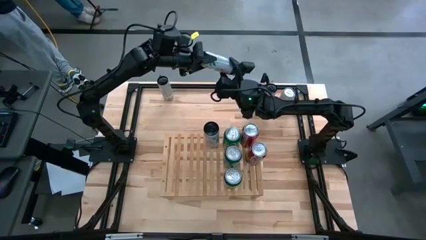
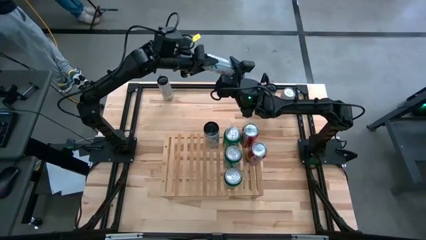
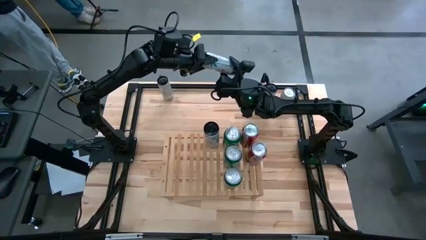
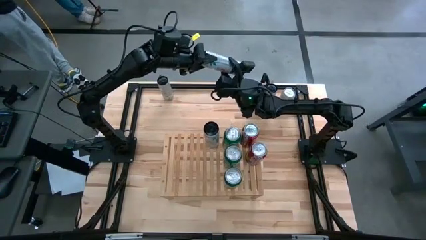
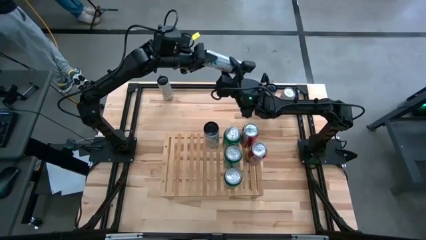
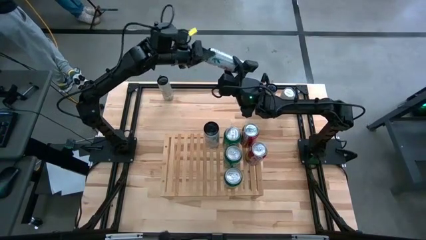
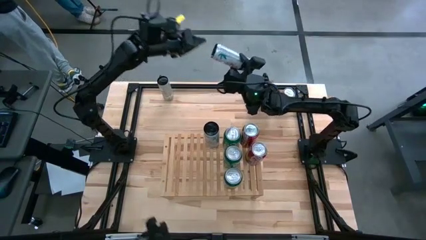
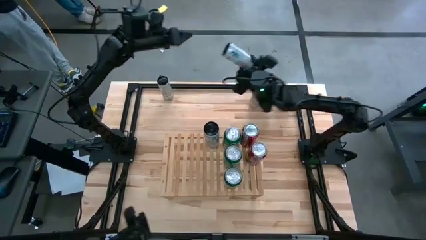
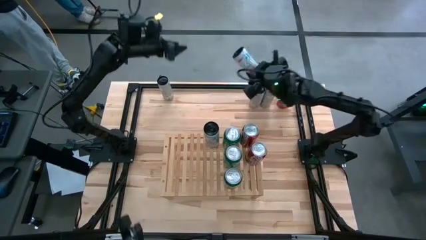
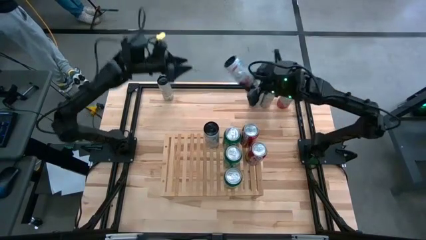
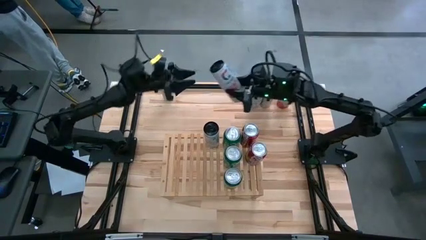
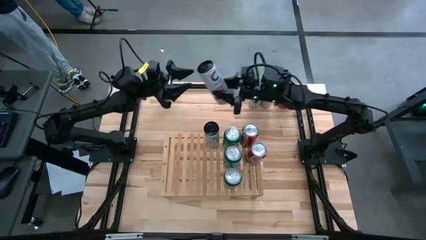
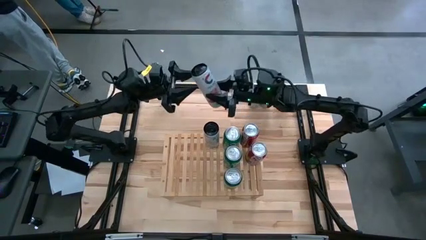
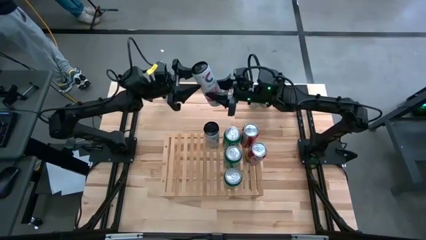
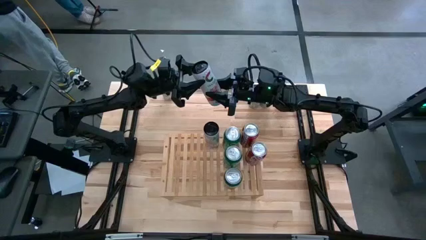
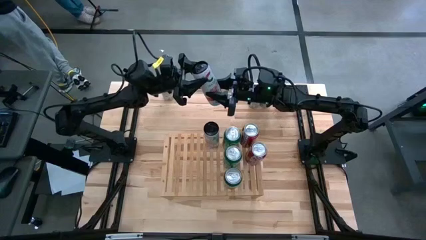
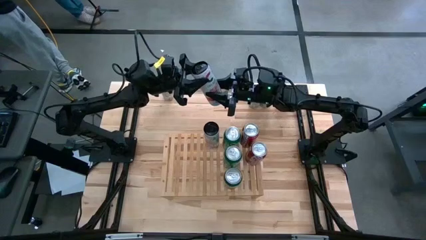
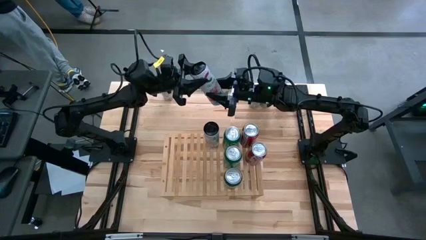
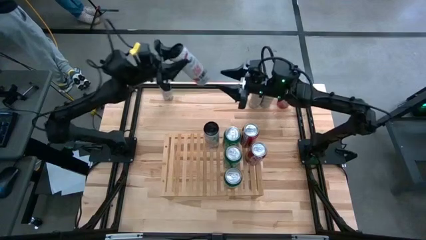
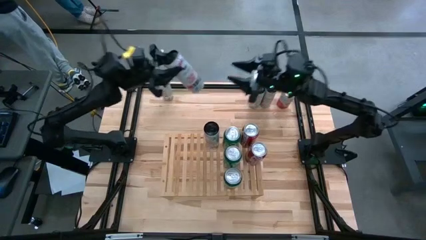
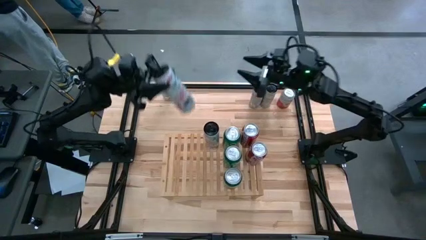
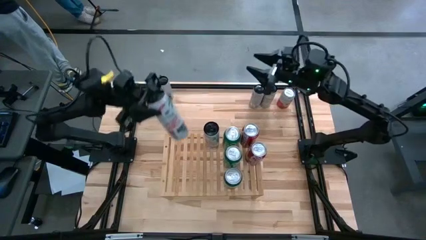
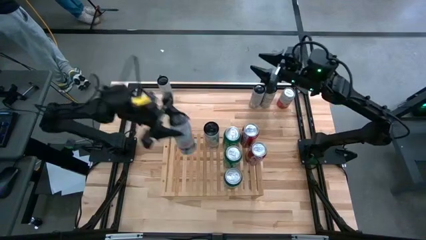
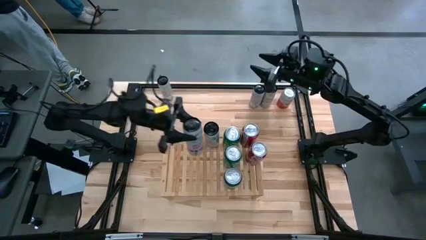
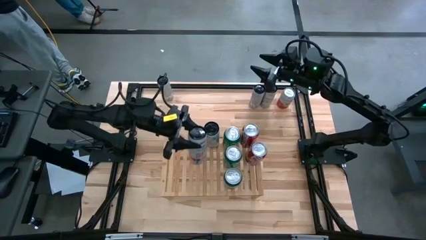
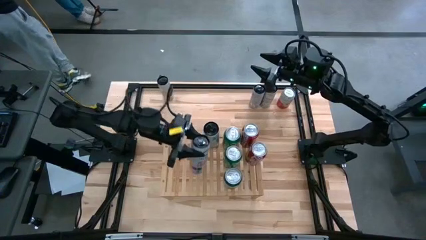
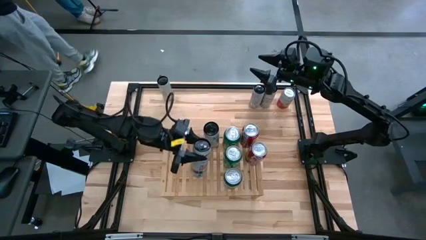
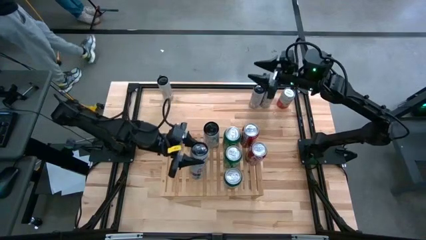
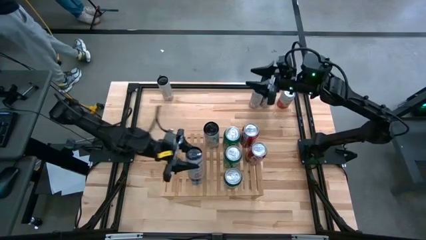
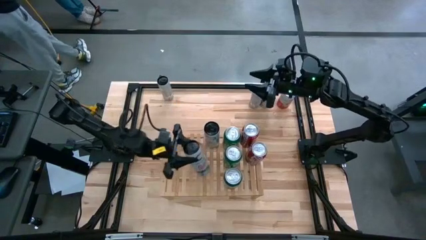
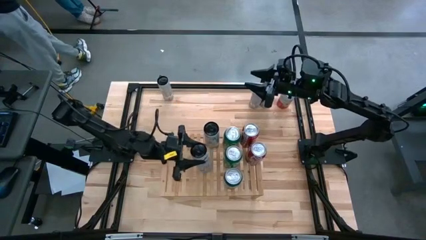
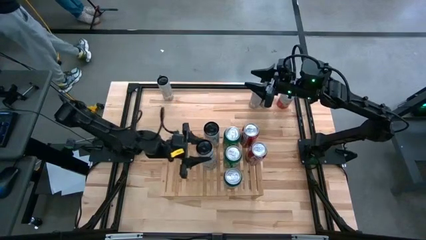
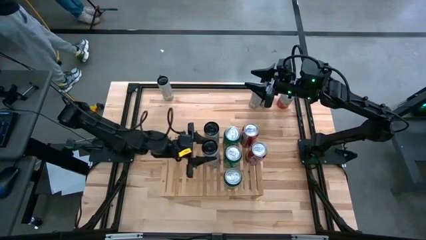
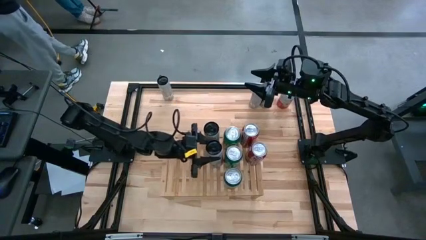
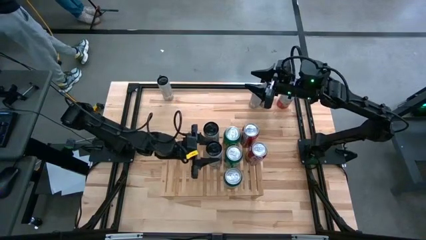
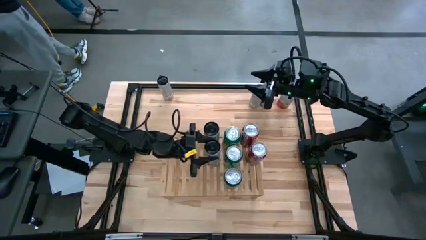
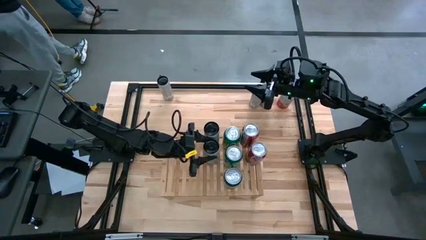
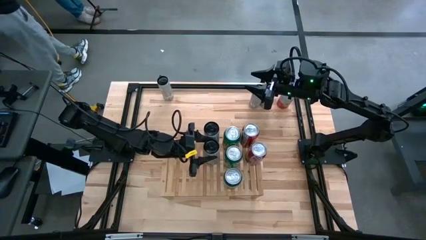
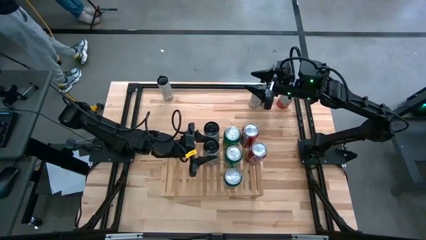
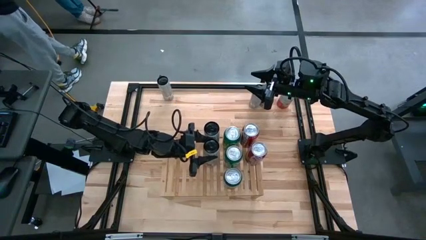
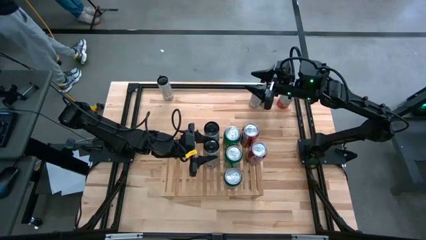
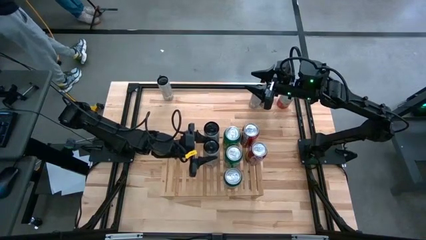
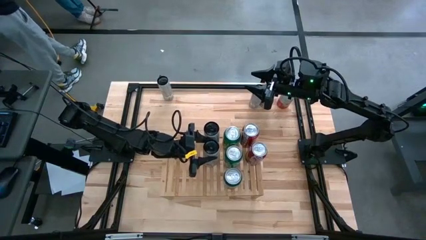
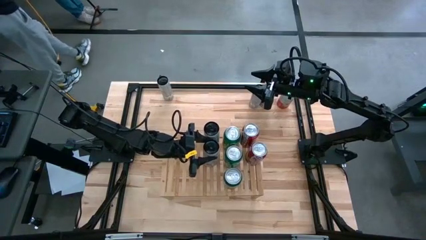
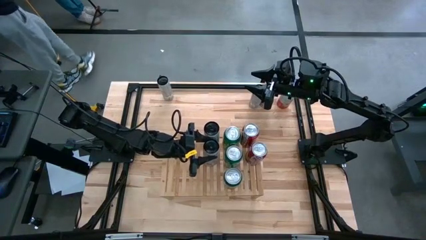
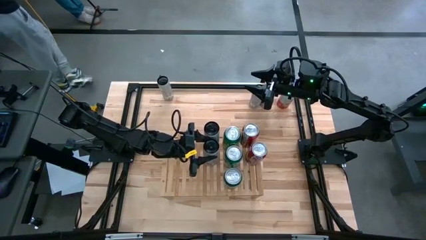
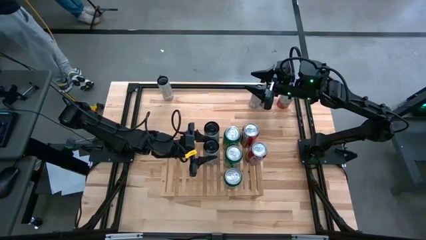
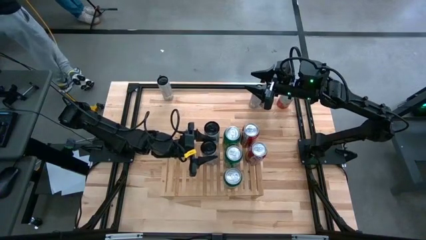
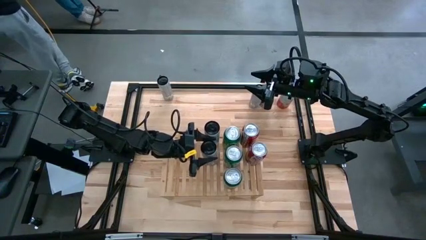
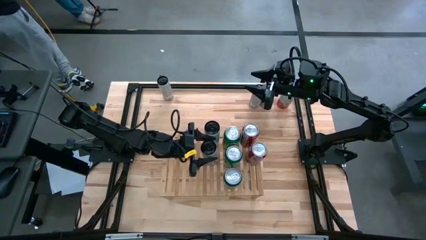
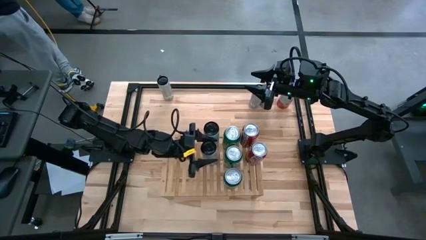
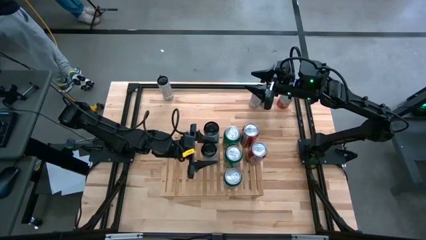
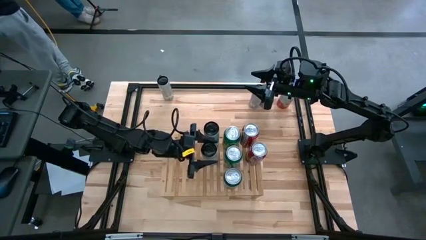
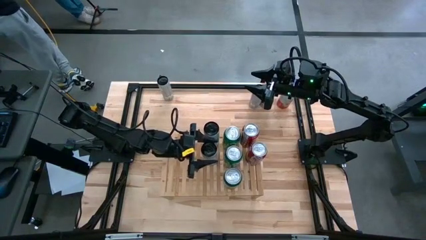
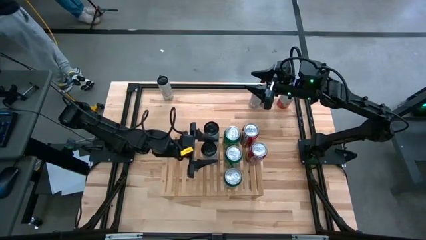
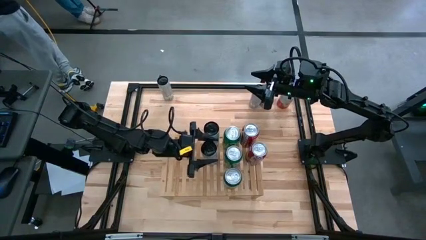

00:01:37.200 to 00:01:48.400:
Task: Place canned beverage on shelf
Put the left white-pink soda can on the shelf aligned with the other white-pink soda can

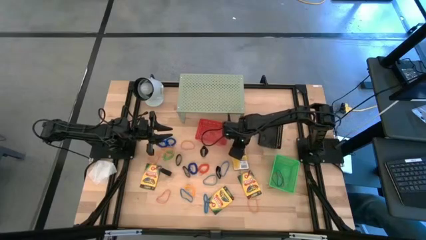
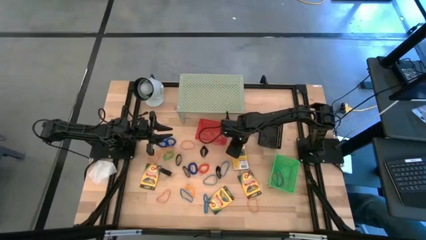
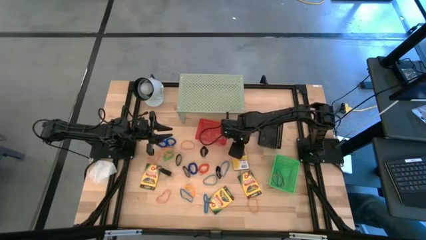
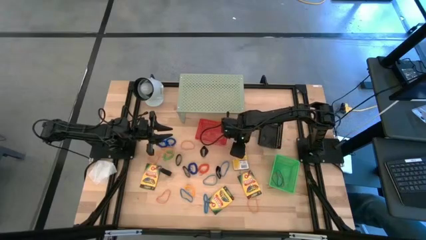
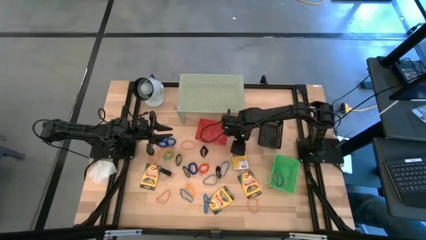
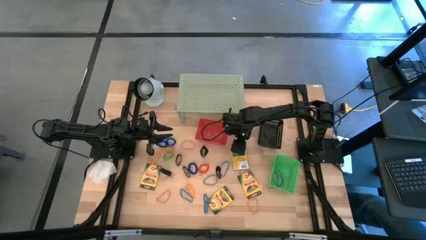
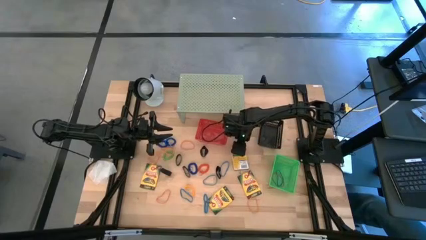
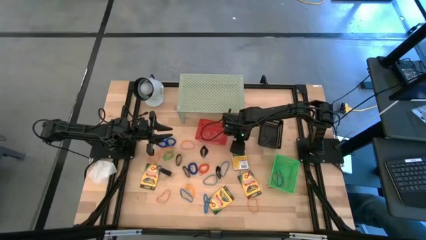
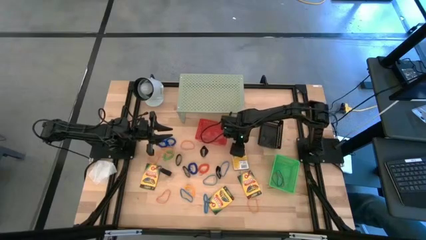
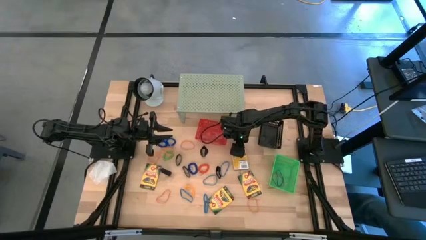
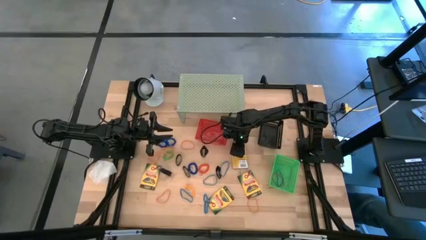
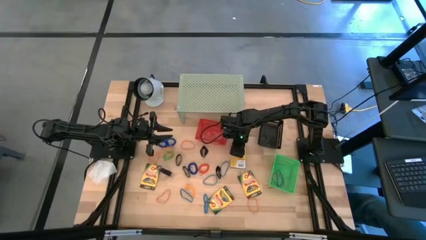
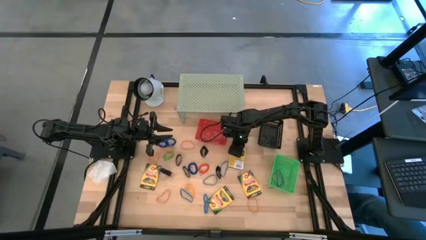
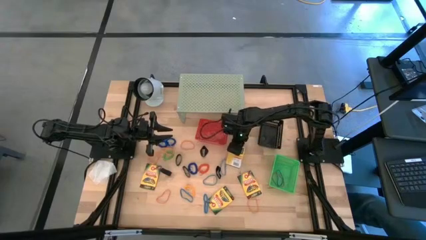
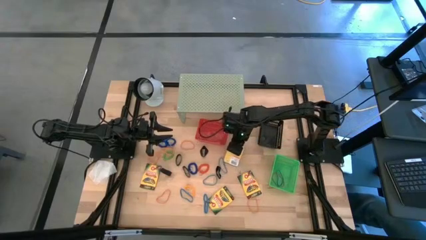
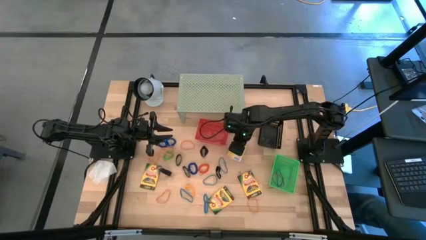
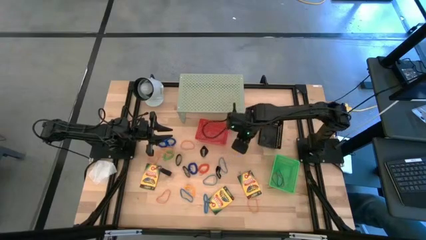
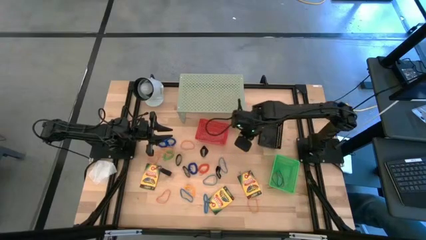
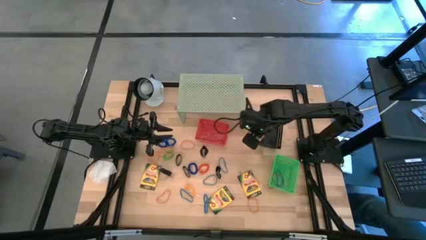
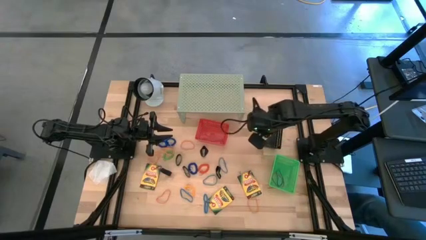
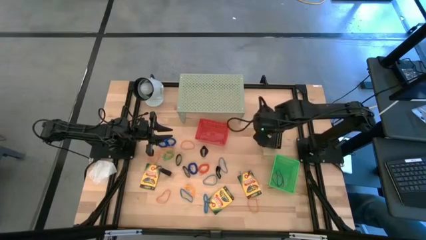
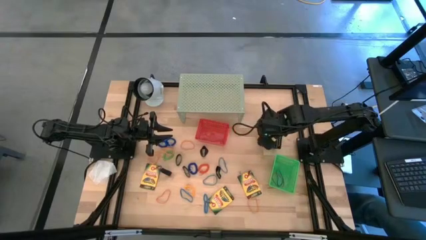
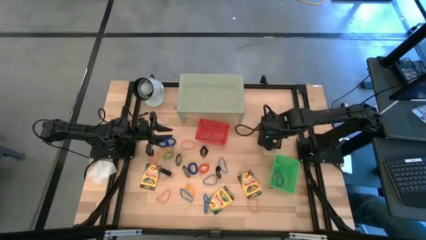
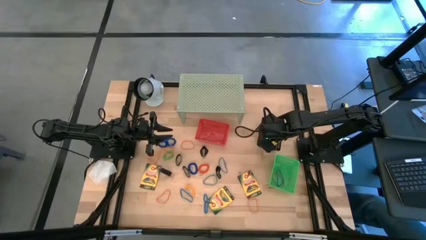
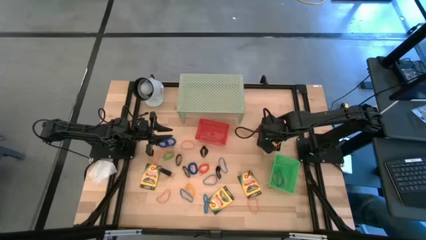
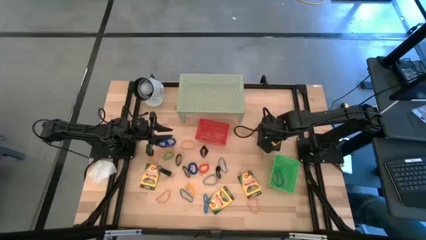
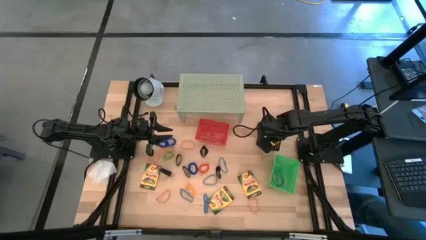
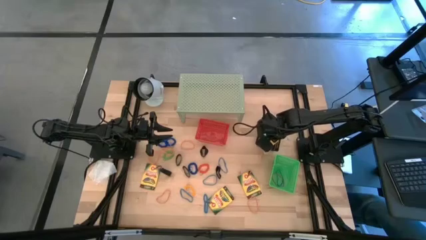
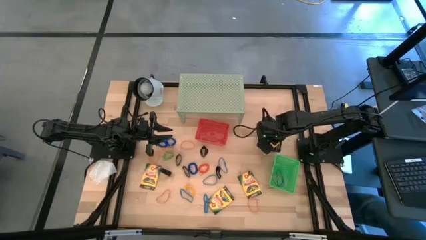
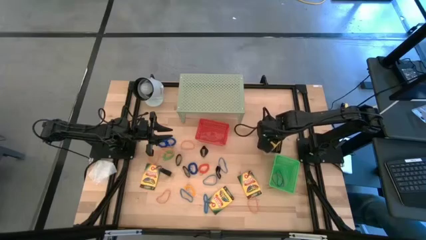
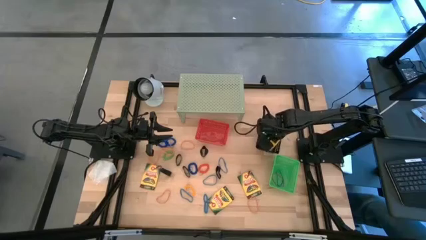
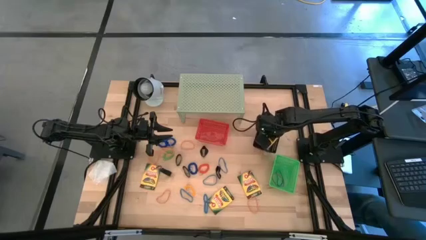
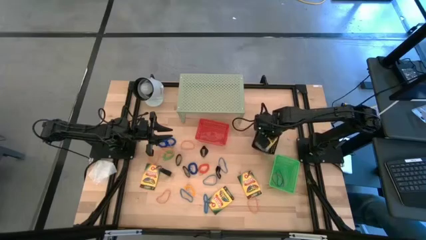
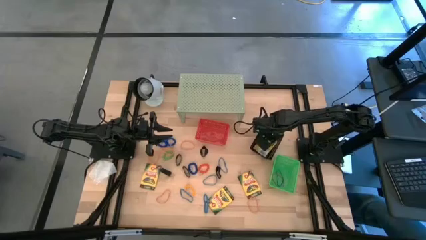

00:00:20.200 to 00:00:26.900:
Task: Pick & Place Office Desk Supplies
Put the crayon box into the black bin
